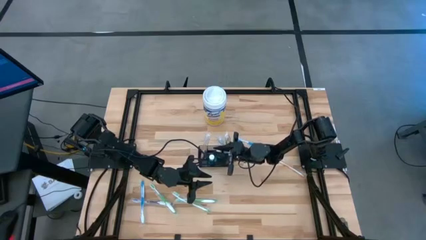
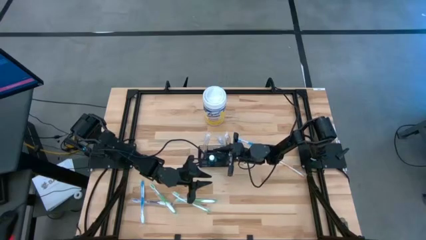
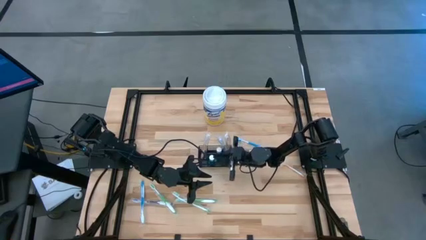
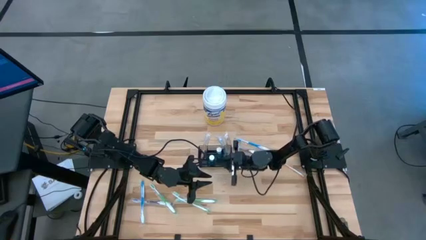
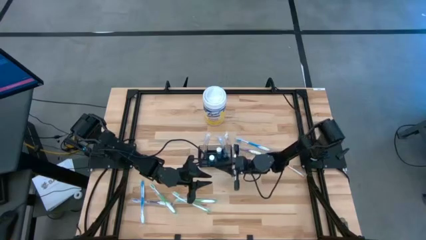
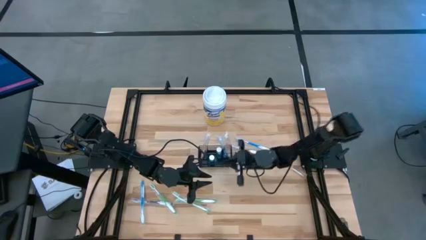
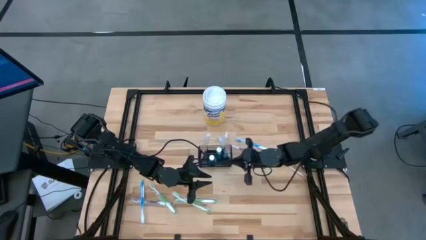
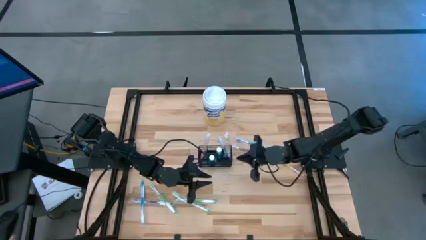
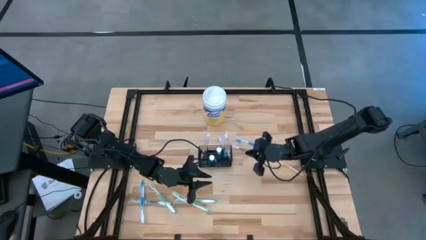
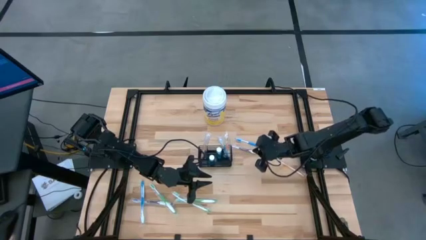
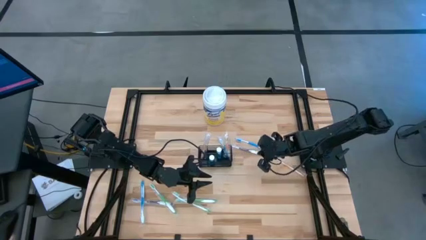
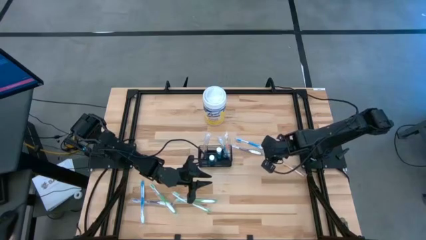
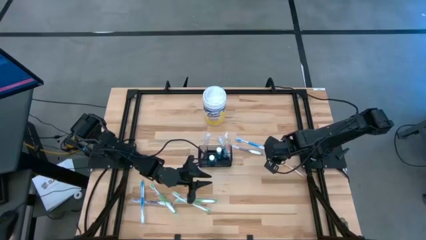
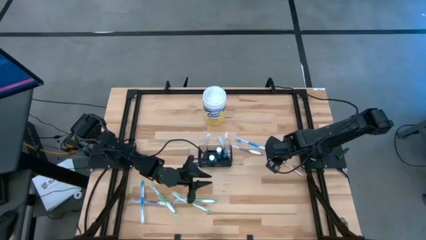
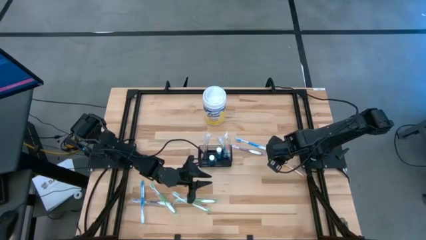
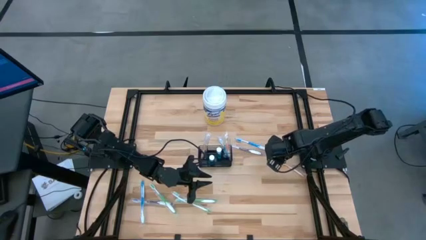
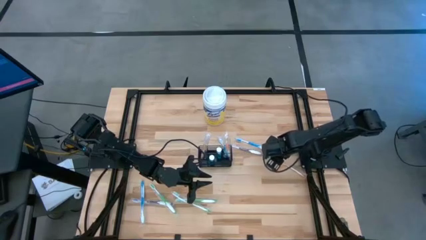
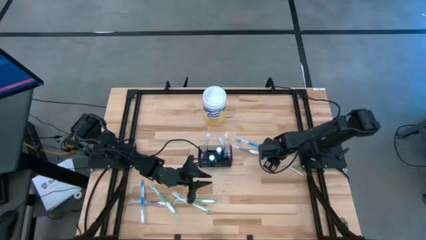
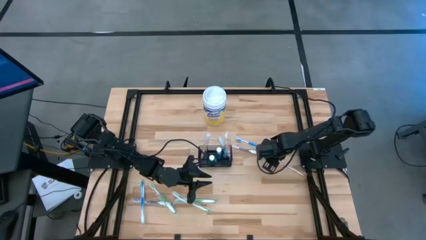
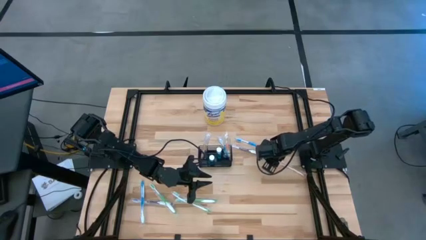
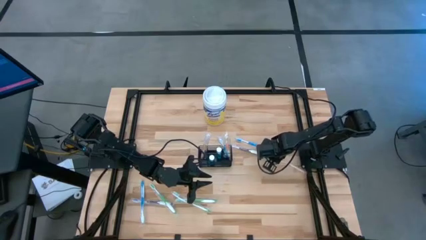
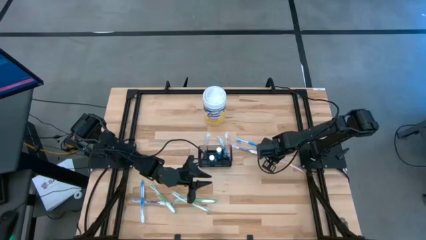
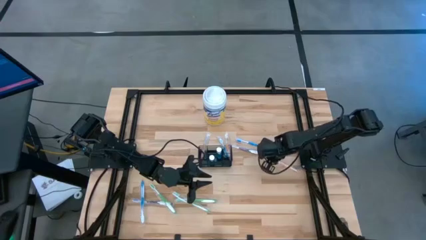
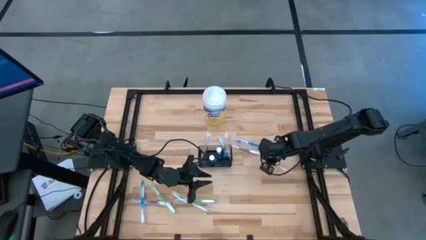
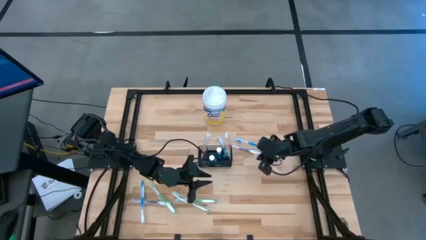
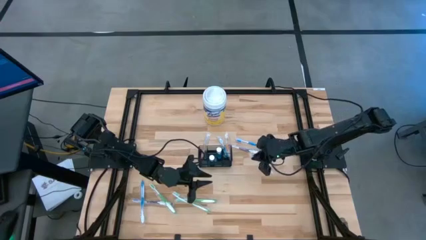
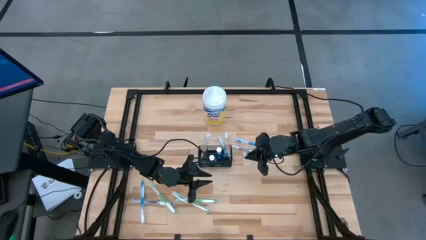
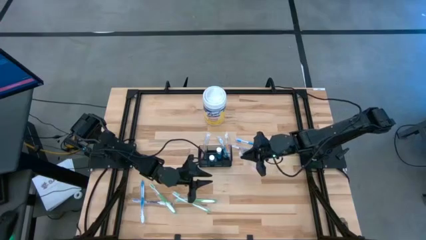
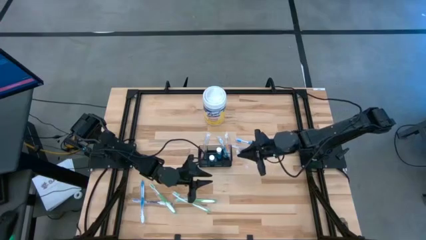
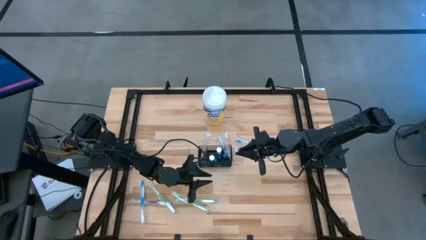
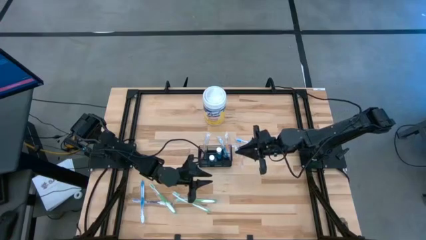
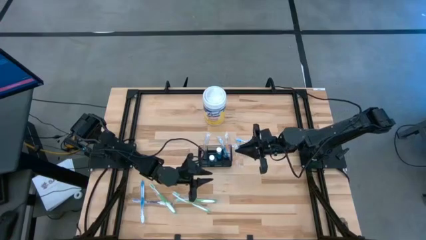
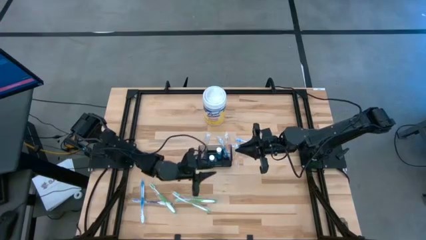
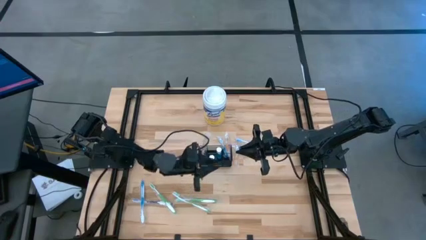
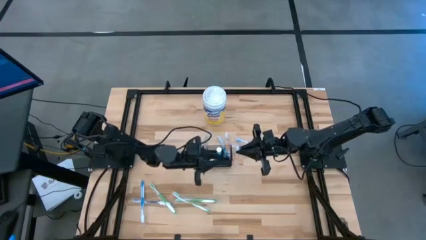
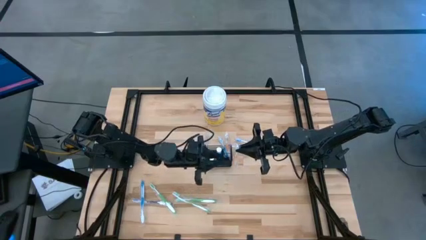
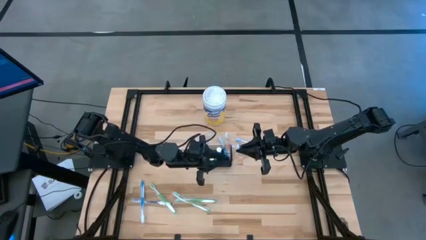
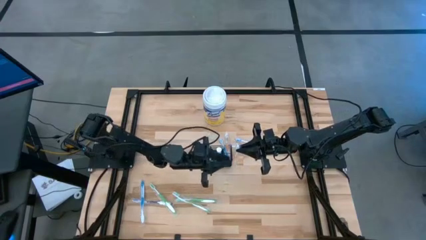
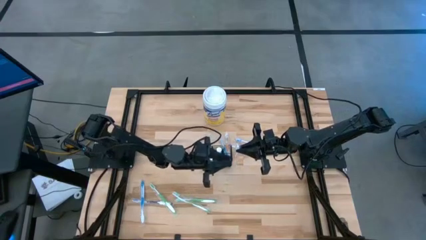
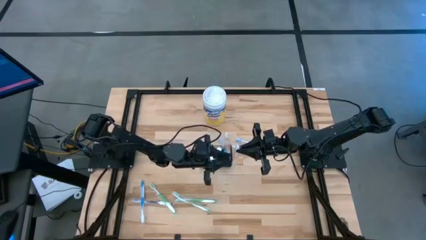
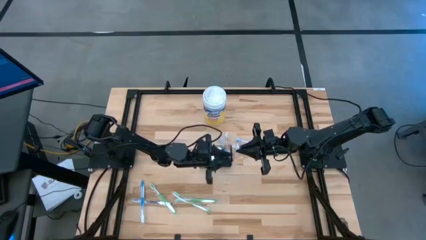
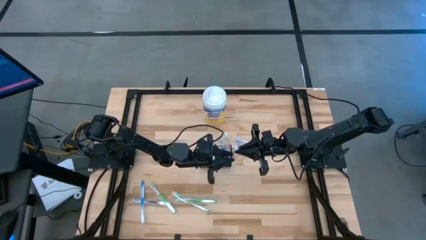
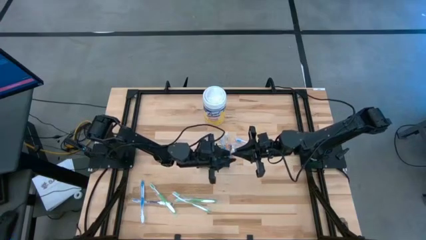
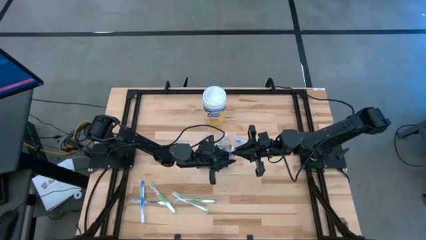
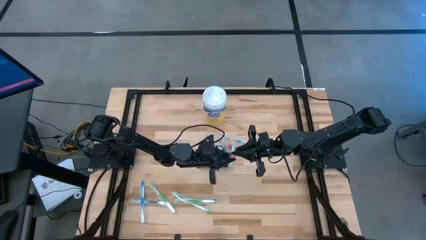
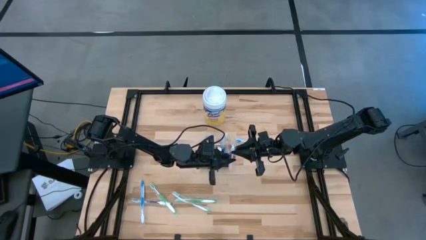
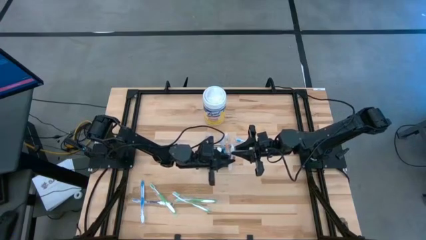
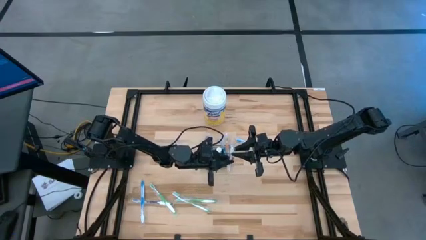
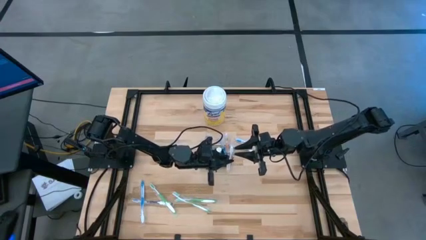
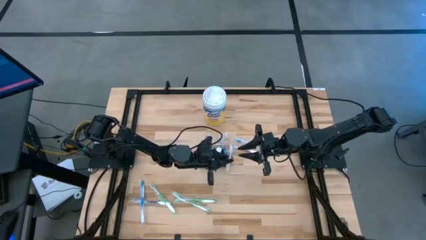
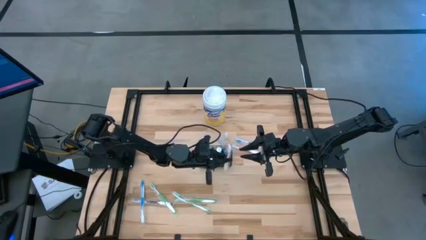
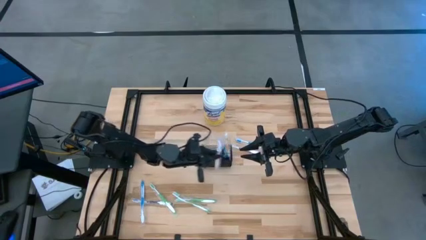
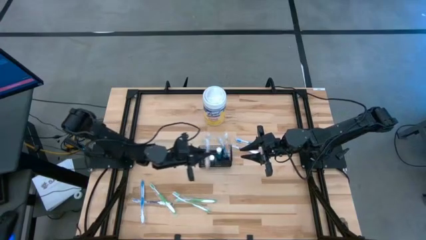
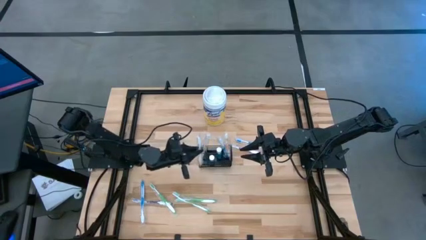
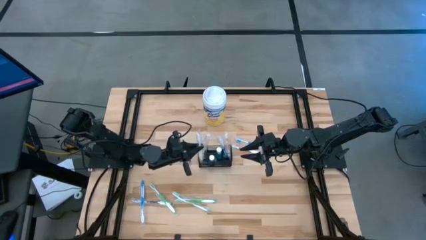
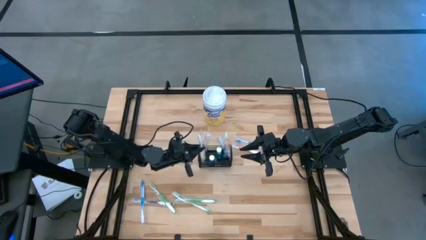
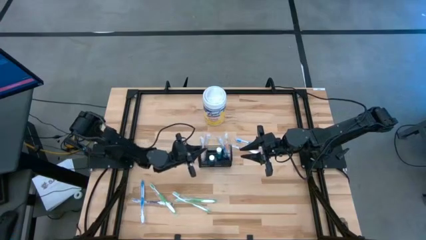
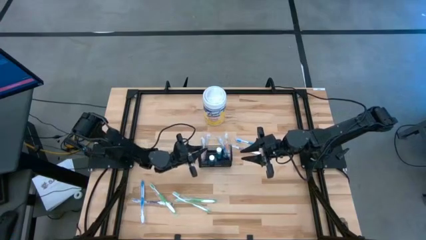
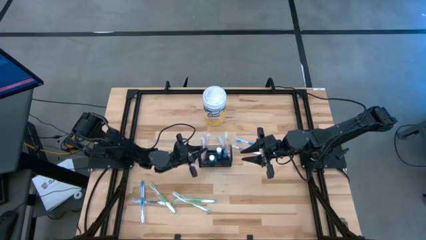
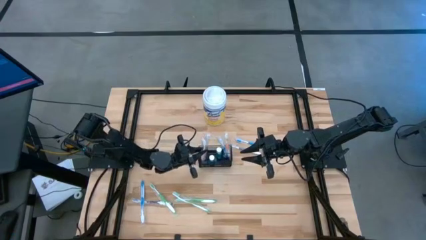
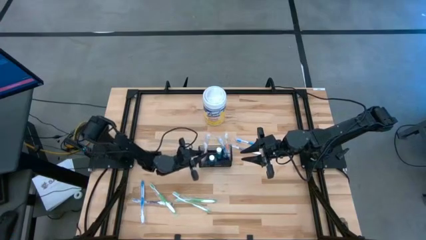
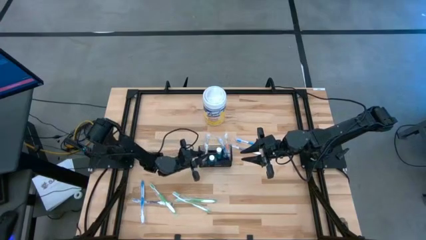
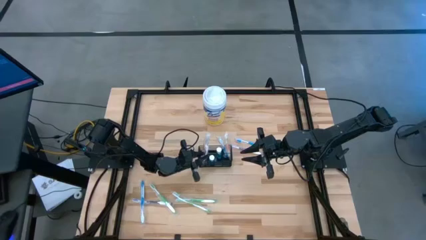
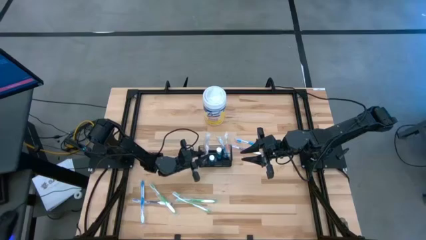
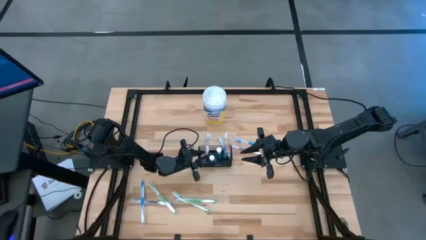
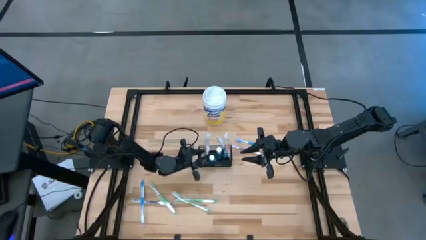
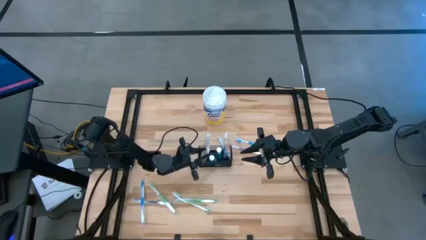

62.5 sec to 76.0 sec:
Task: Pick & Place toothbrushing station
Put the orange toothbrush into the mesh organizer

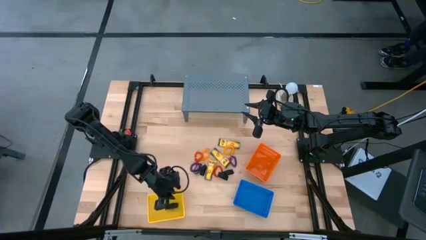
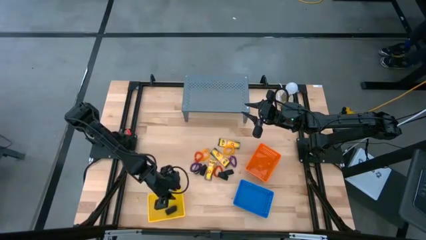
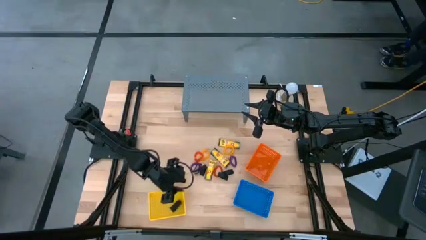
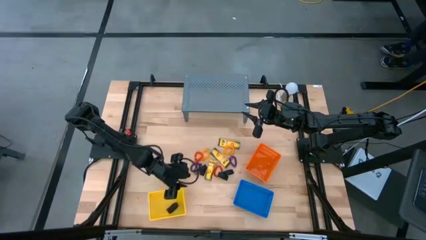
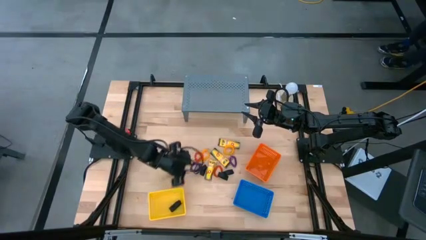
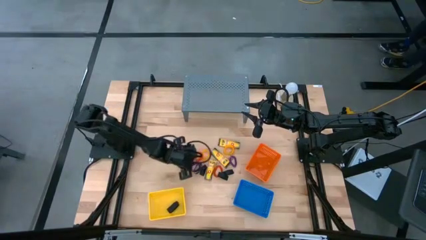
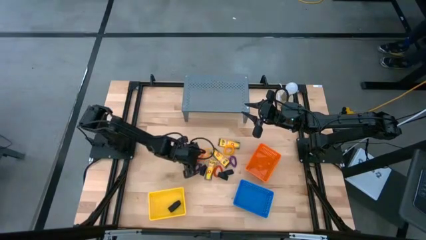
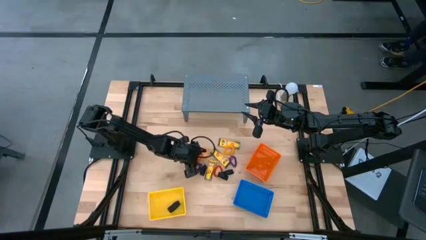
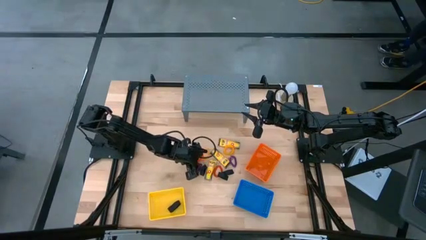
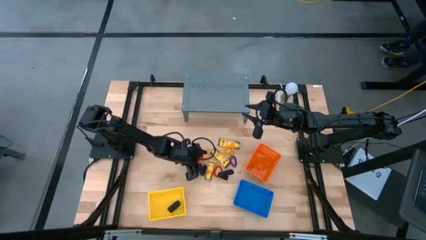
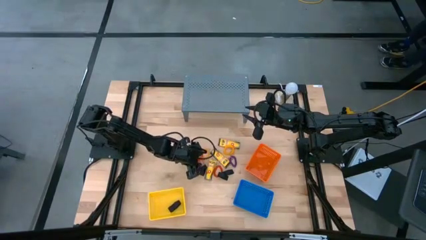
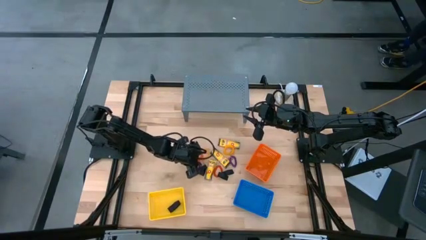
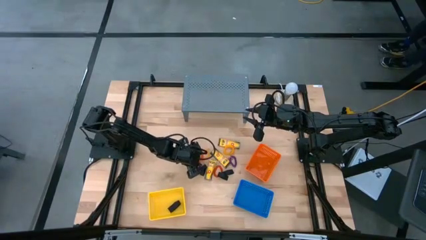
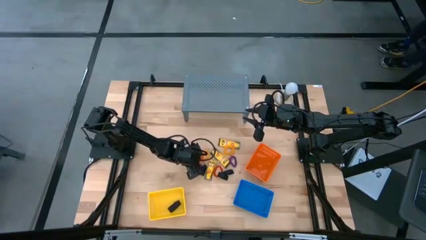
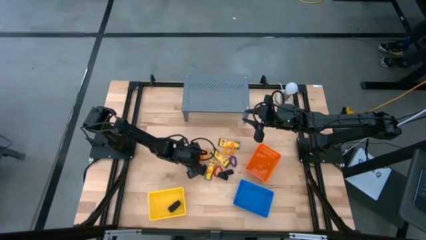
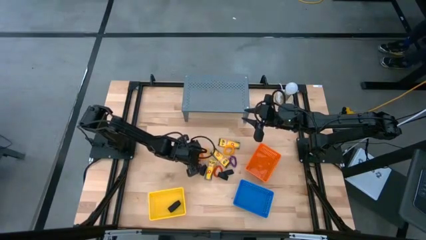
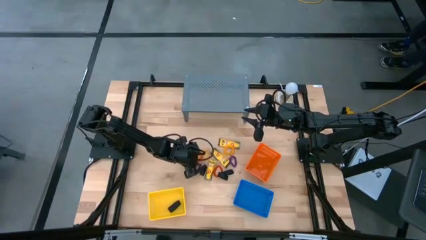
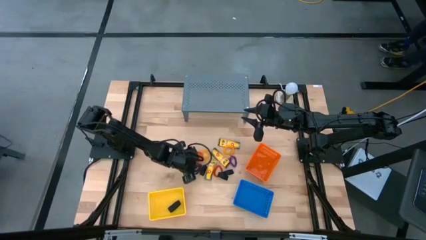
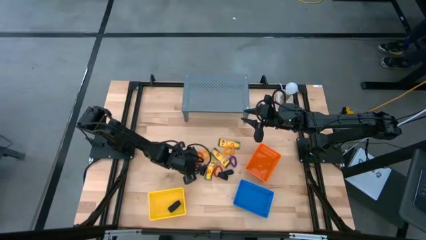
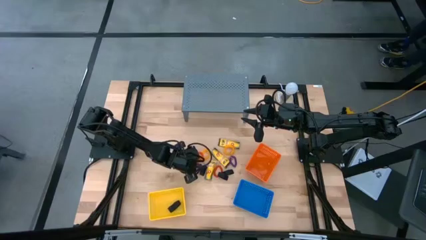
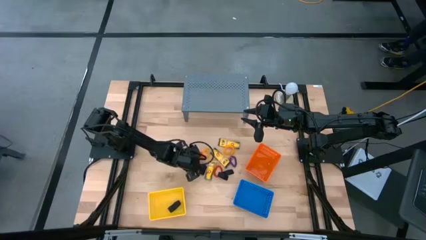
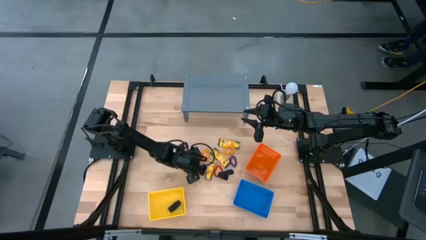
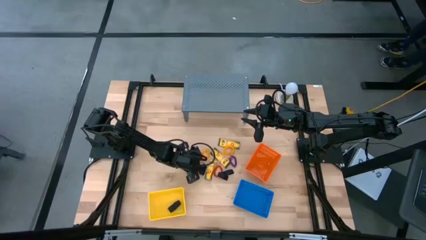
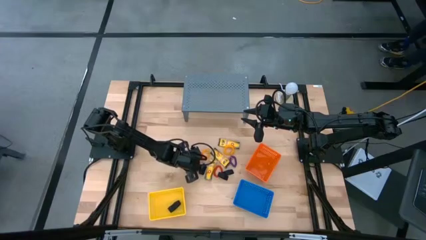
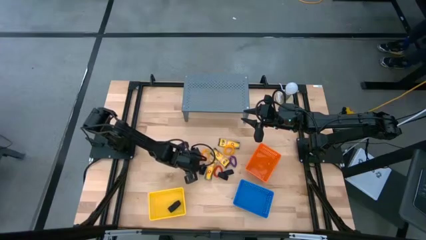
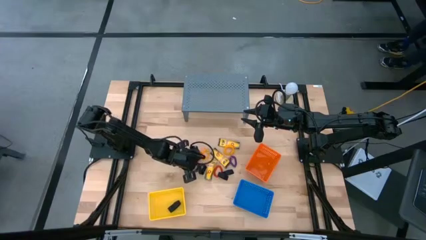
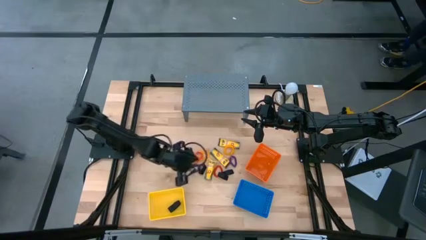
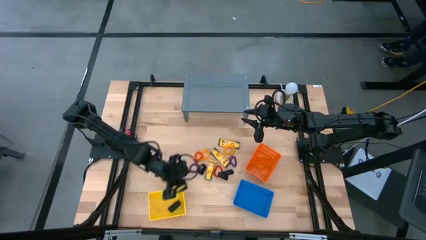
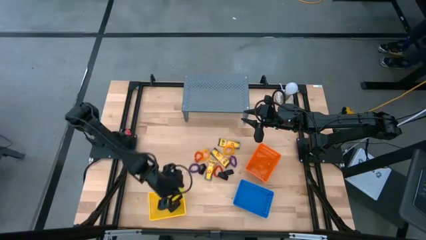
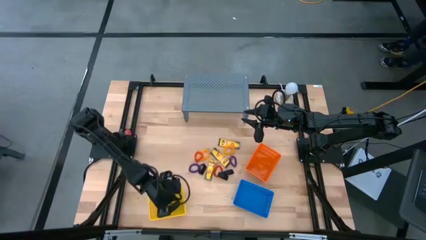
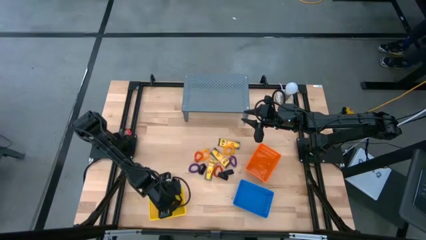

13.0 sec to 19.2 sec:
Task: Pick & Place Office Desk Supplies
Put the black rubber band into the yellow basket
